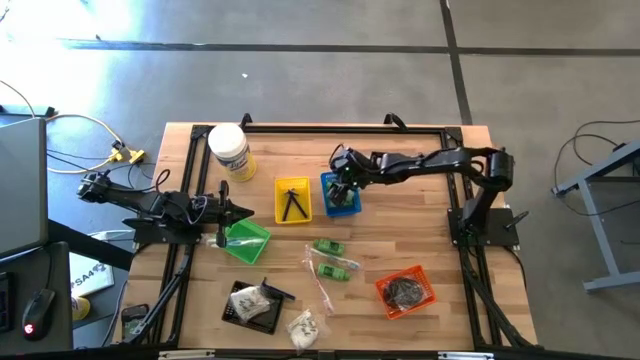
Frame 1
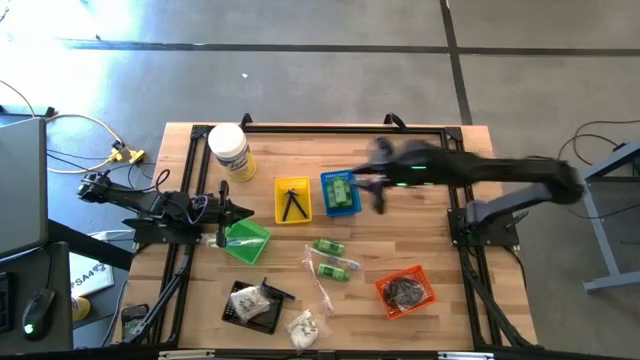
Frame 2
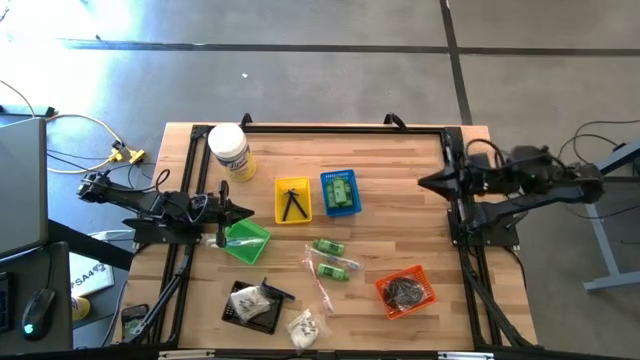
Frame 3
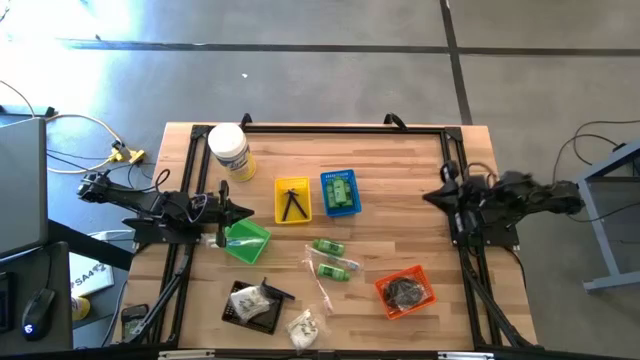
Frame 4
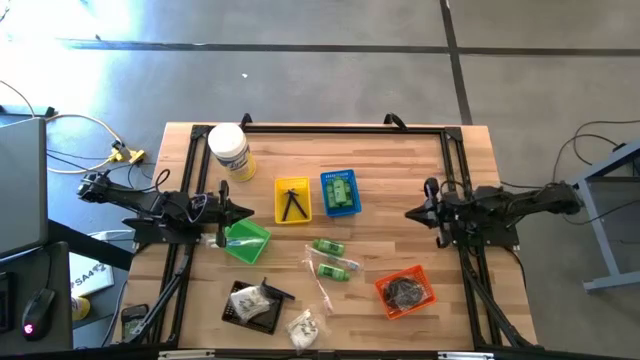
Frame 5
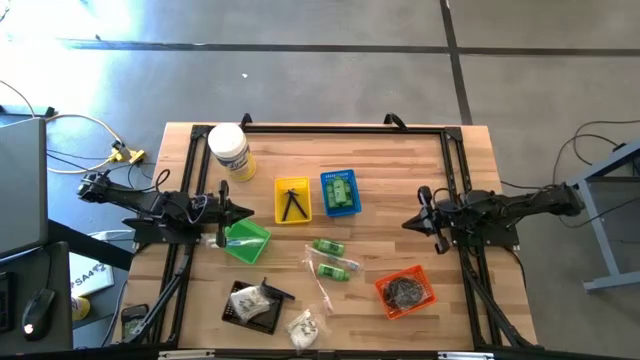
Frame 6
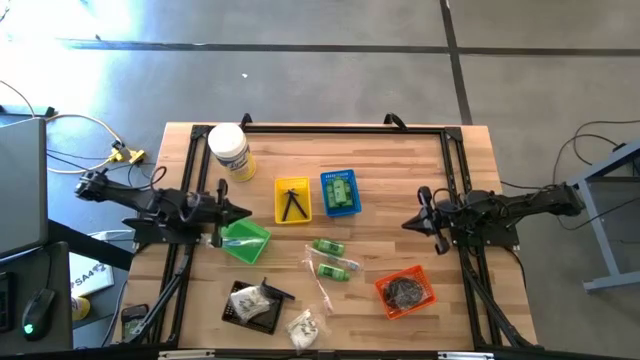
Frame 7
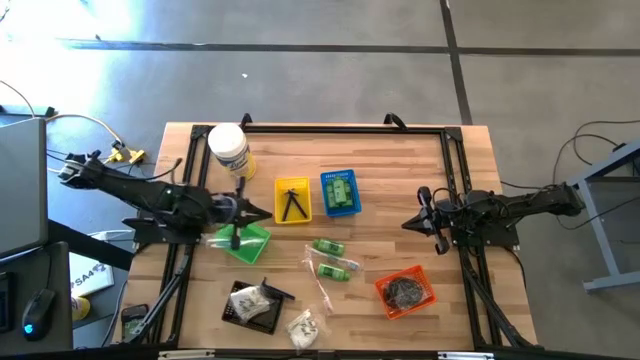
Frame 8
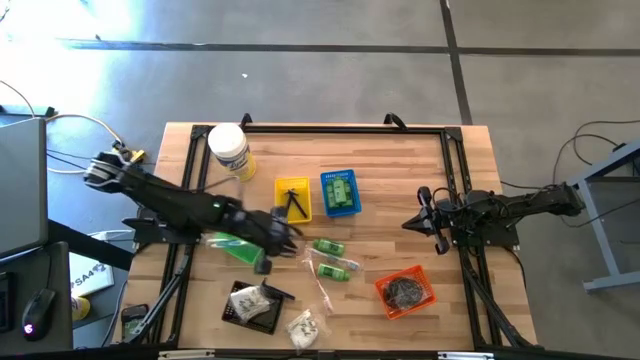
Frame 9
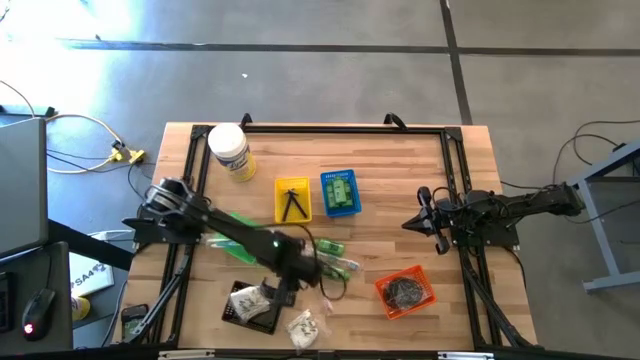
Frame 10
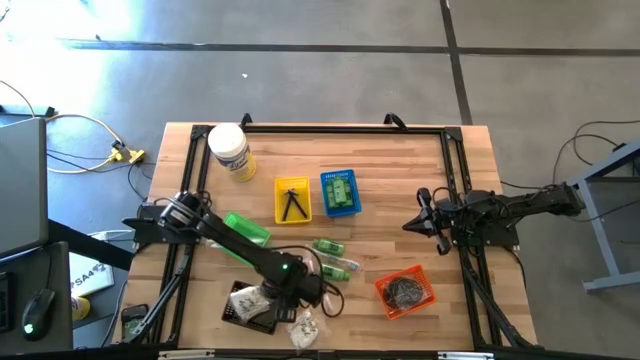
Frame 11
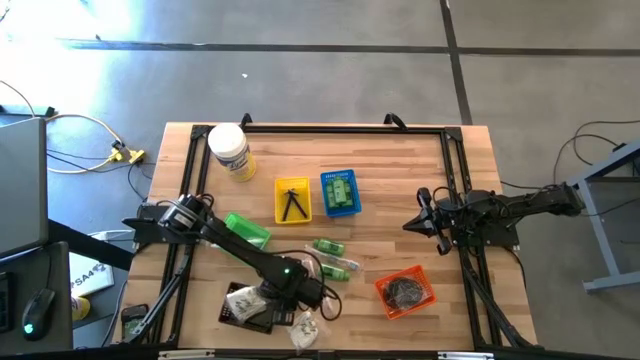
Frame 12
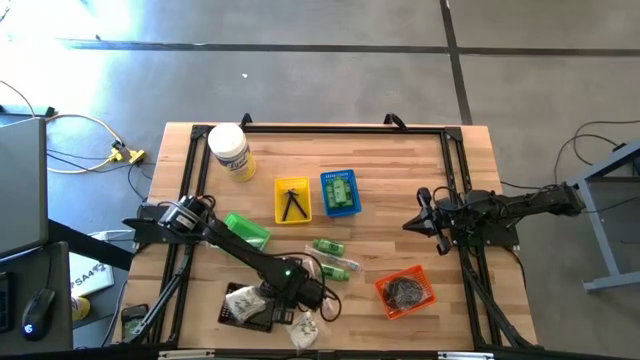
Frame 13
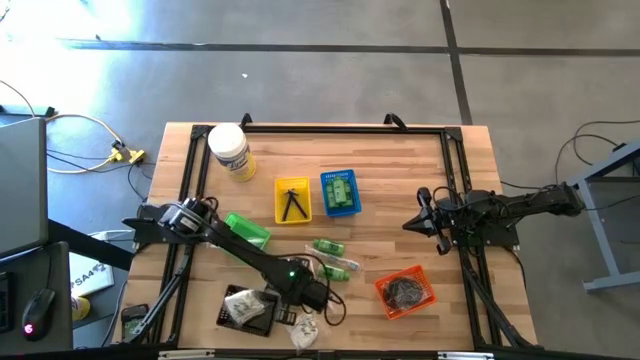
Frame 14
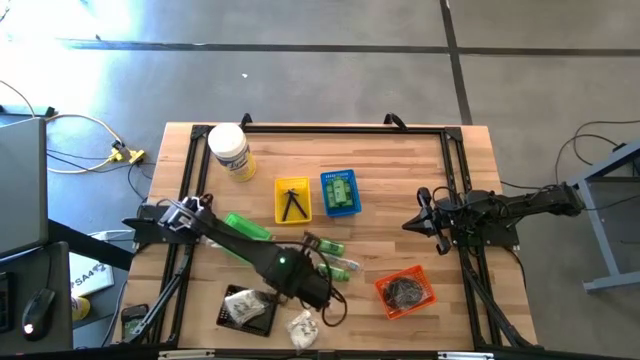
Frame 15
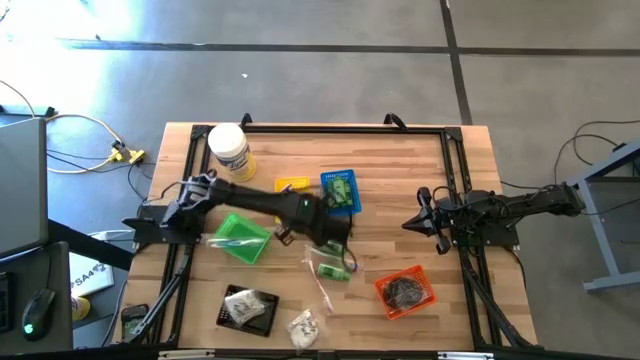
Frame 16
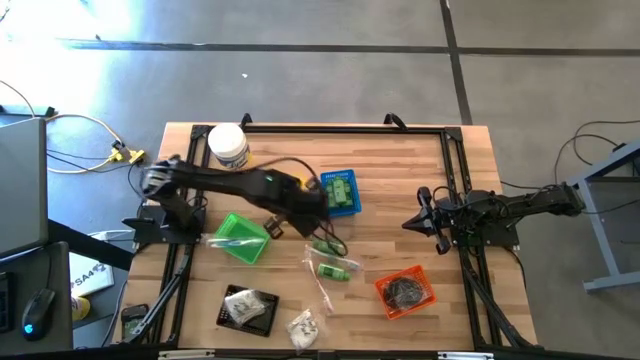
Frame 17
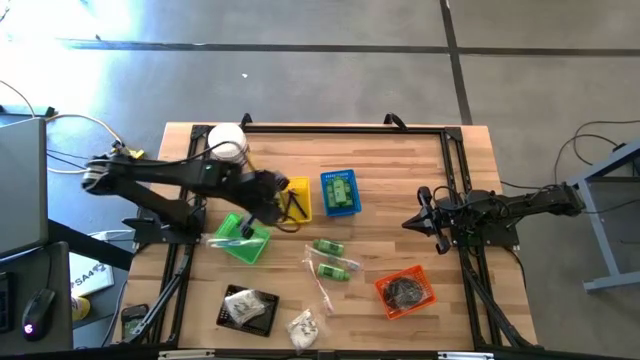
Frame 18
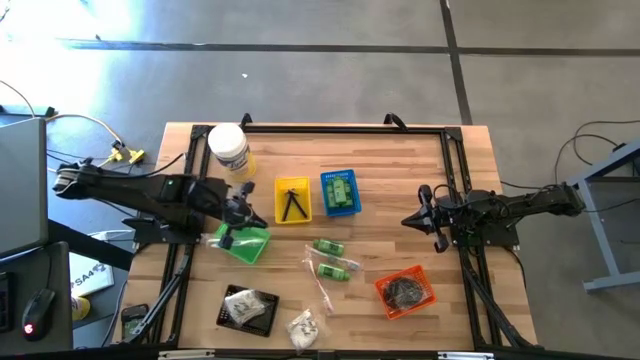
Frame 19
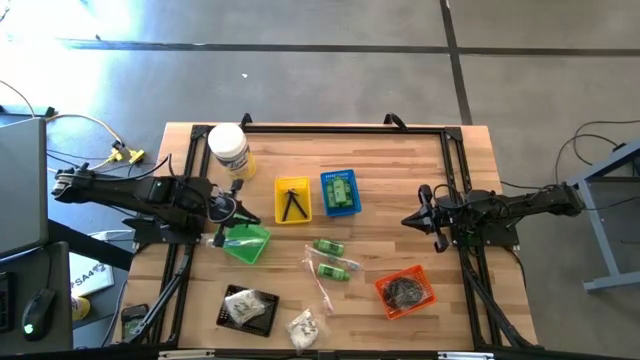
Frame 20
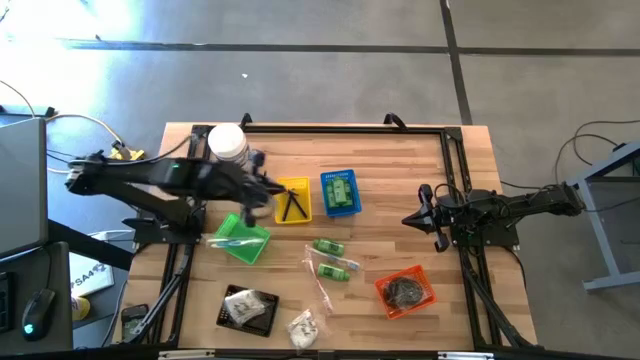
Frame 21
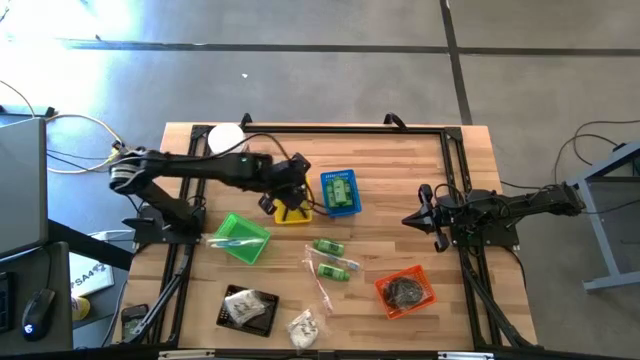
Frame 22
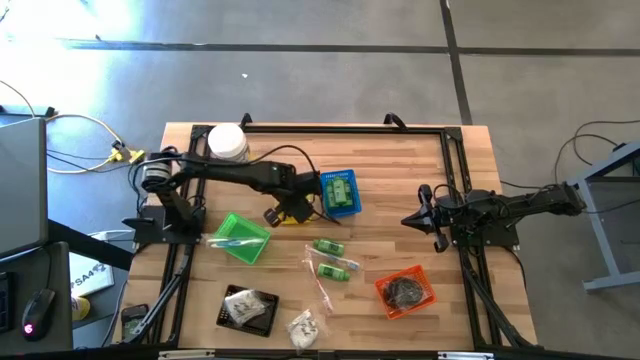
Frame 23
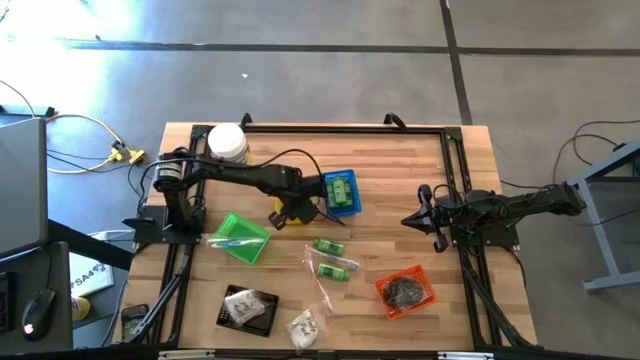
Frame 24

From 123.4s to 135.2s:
Task: Pick & Place Travel size toiletries
Put the razor into the yellow bin

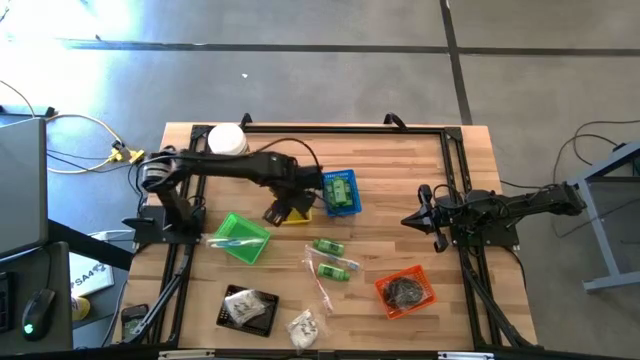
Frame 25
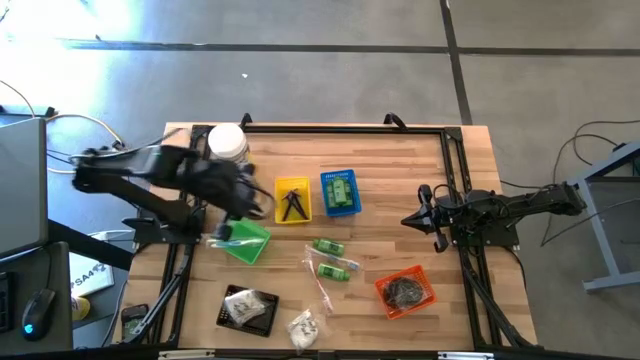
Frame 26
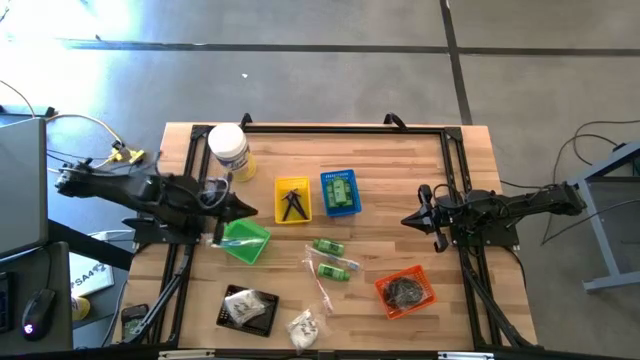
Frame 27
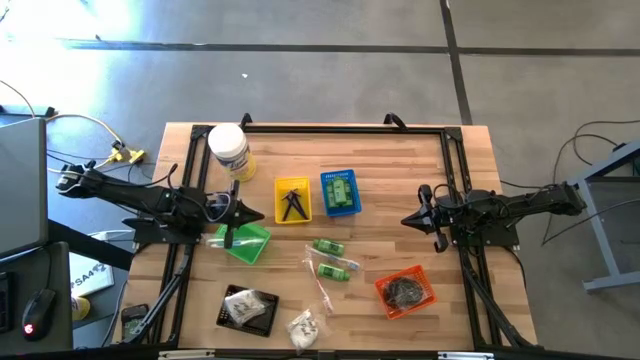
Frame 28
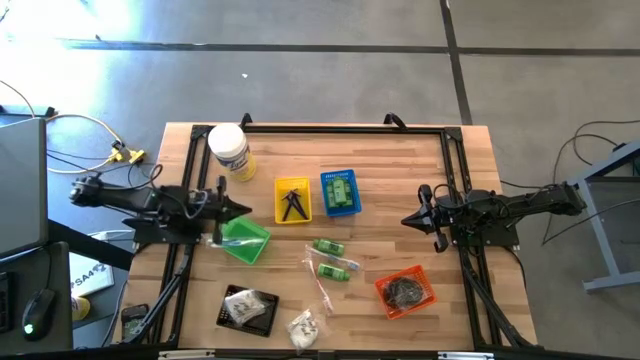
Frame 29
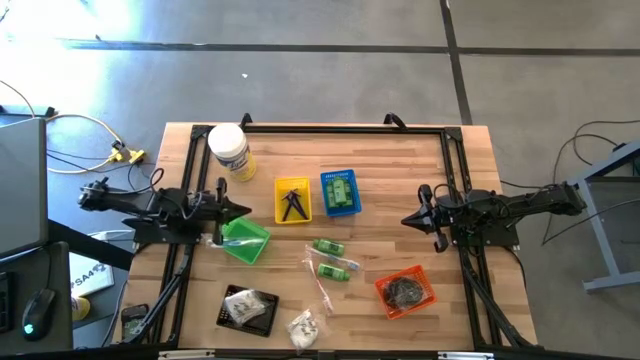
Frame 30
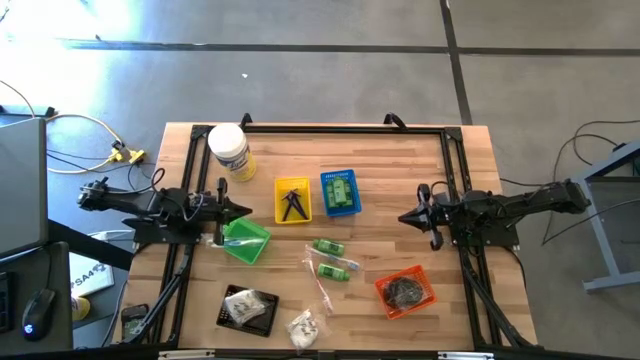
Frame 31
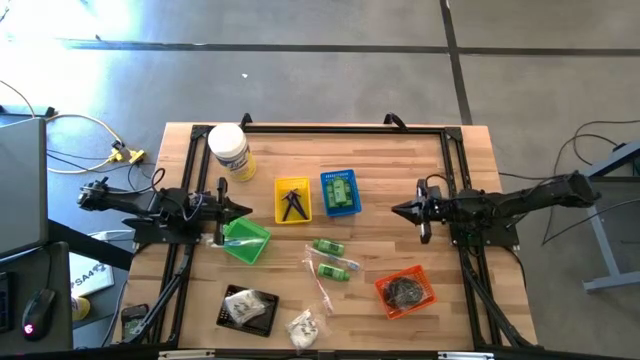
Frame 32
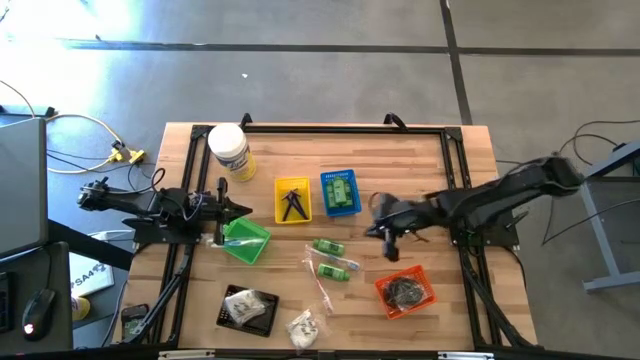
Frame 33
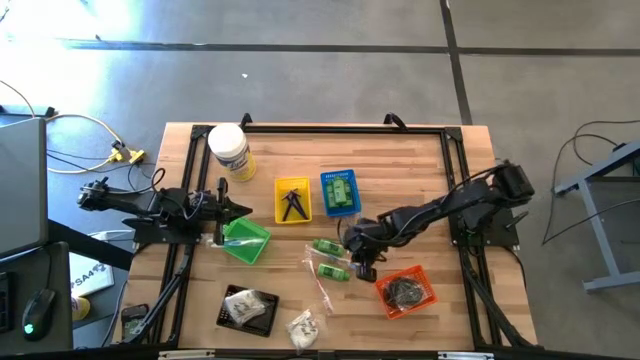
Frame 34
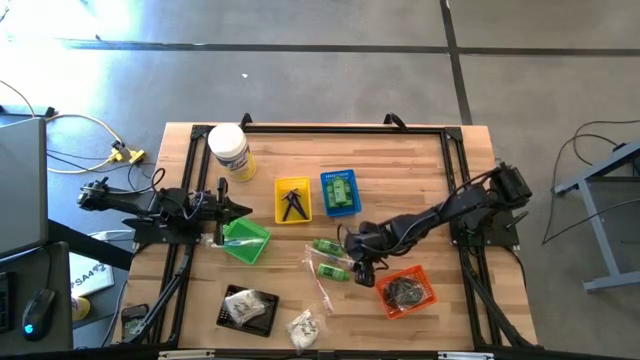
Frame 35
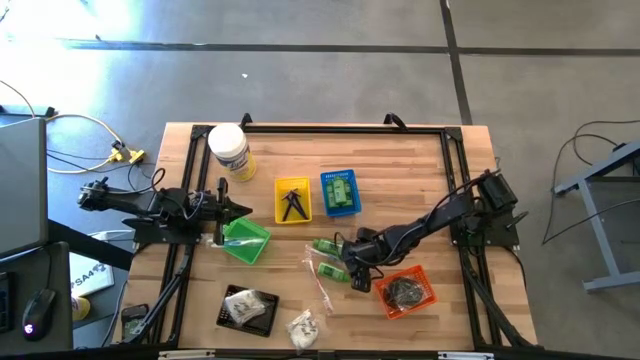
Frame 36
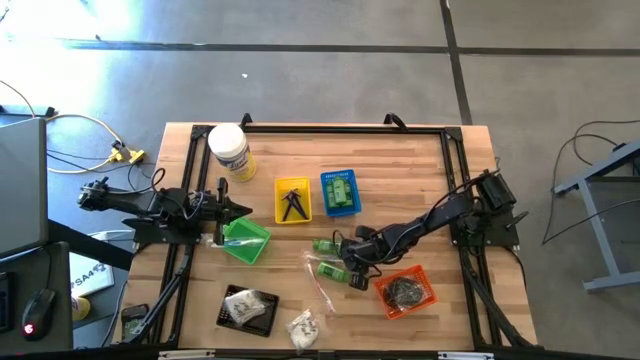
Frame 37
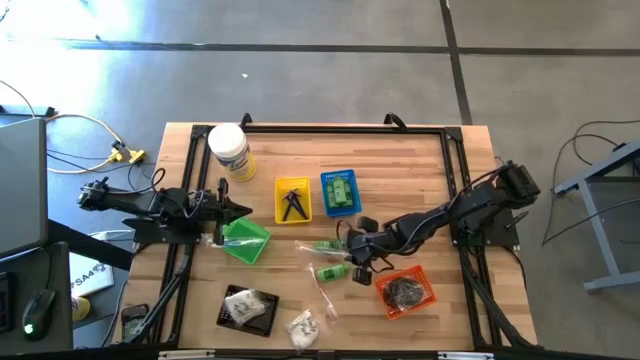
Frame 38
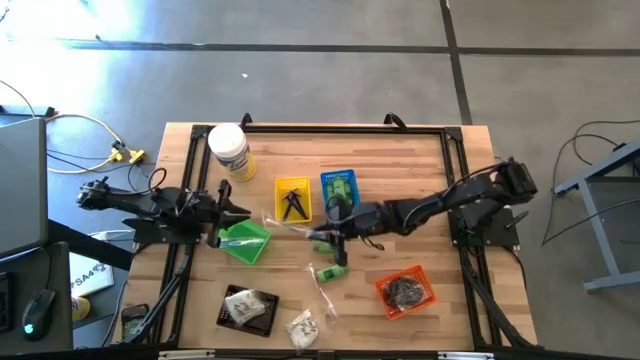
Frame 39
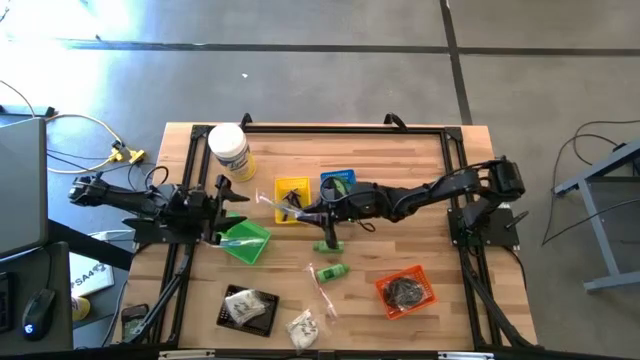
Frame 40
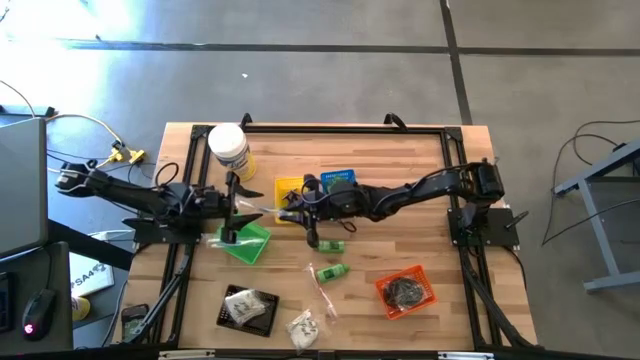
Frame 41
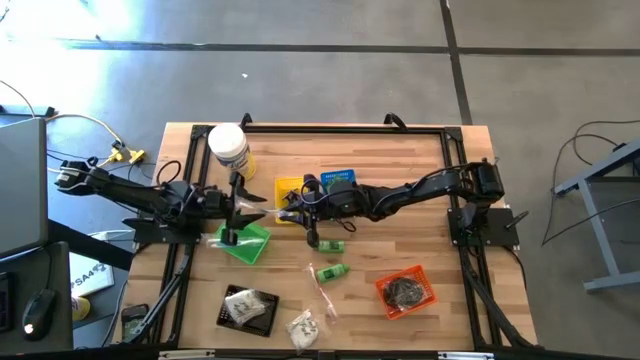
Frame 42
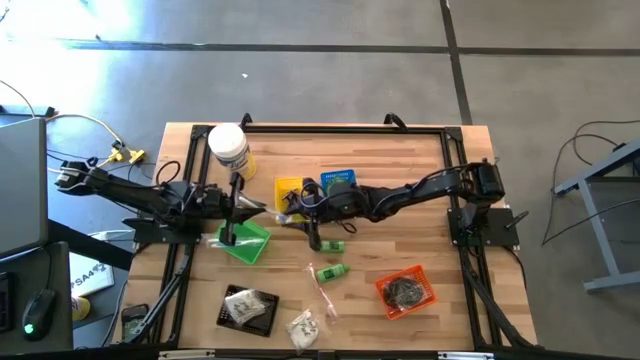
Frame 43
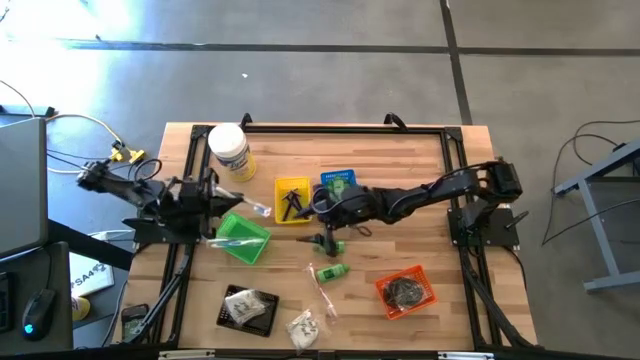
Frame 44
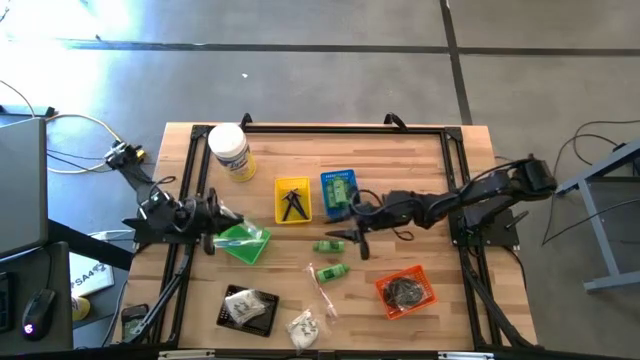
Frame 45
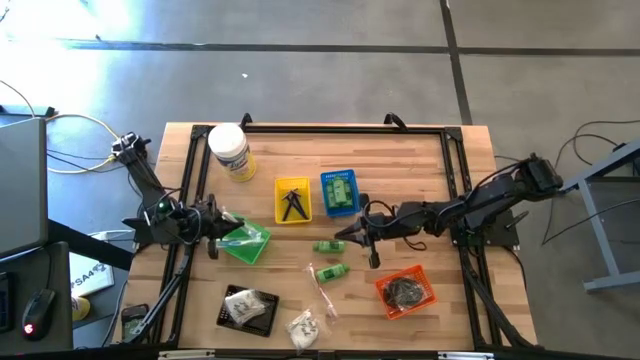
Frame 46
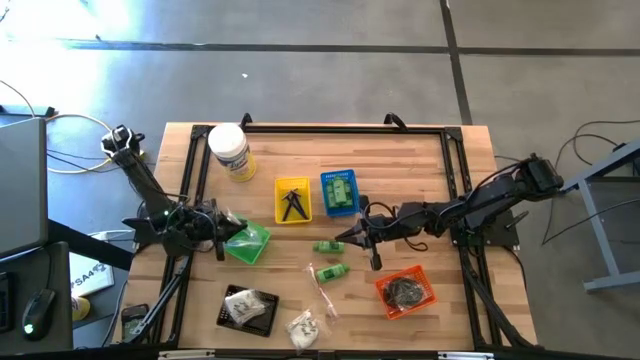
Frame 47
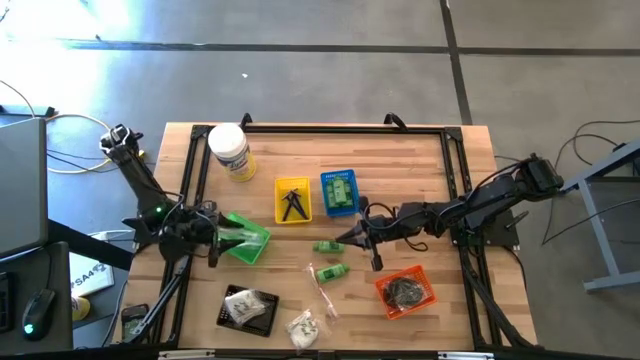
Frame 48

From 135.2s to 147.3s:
Put the blue toothbrush into the green bin
